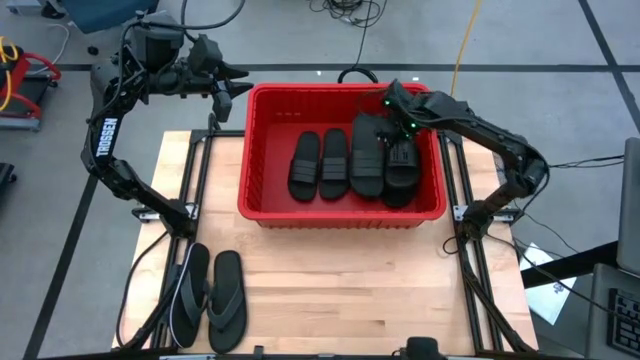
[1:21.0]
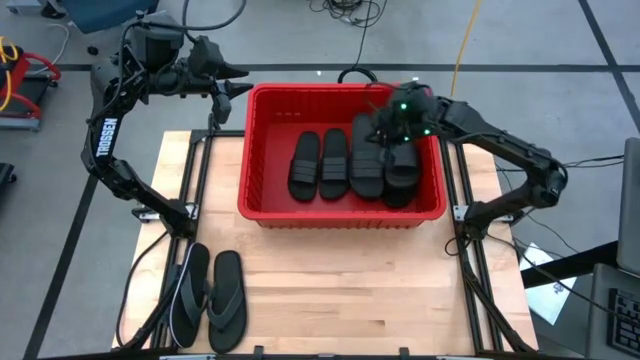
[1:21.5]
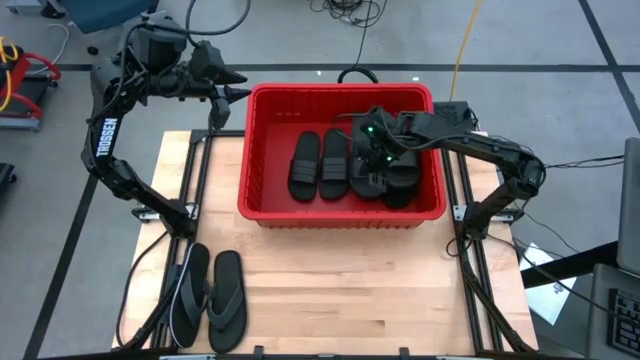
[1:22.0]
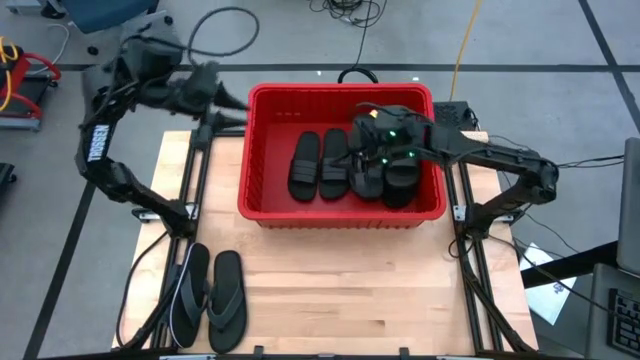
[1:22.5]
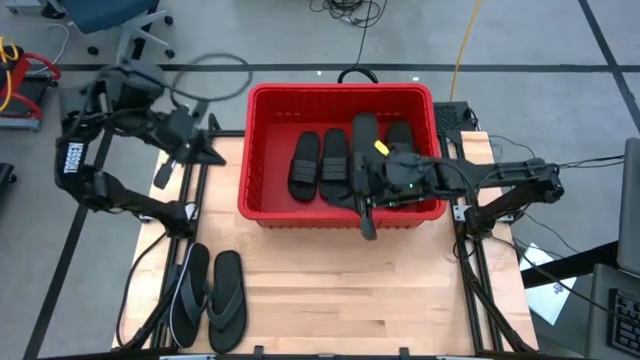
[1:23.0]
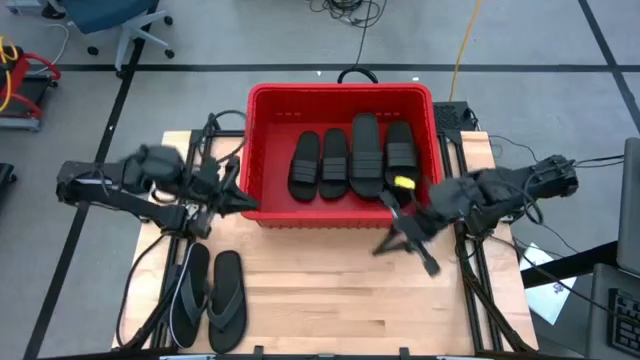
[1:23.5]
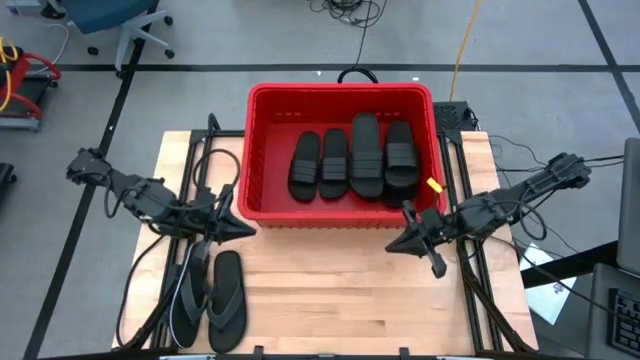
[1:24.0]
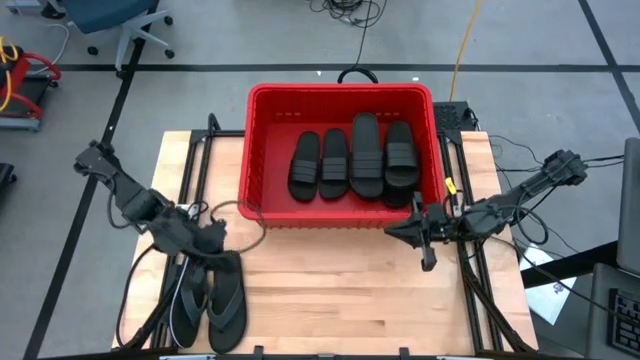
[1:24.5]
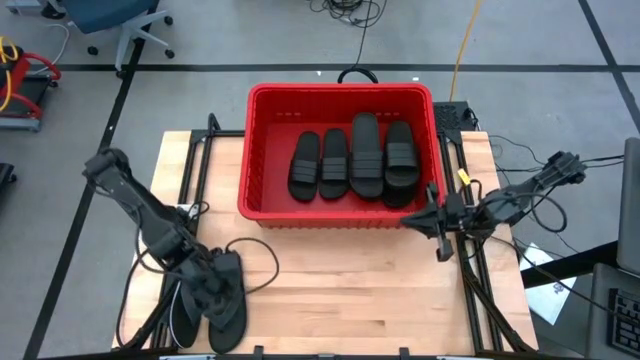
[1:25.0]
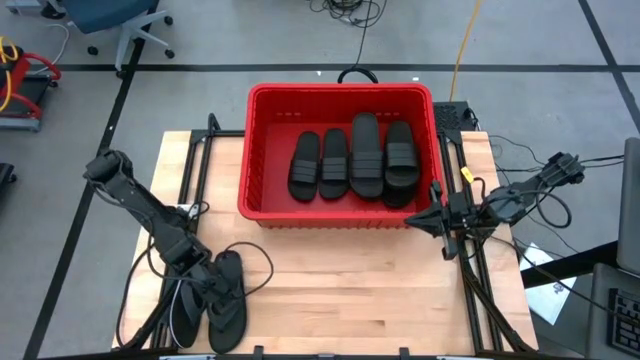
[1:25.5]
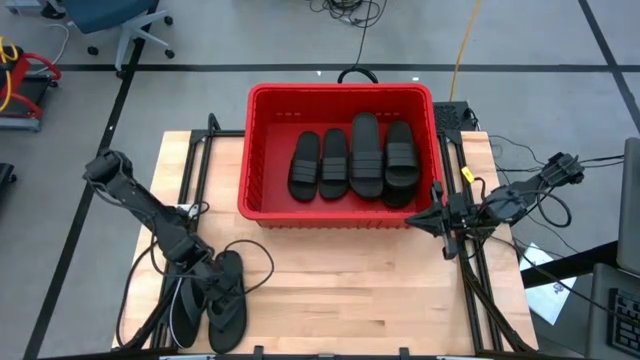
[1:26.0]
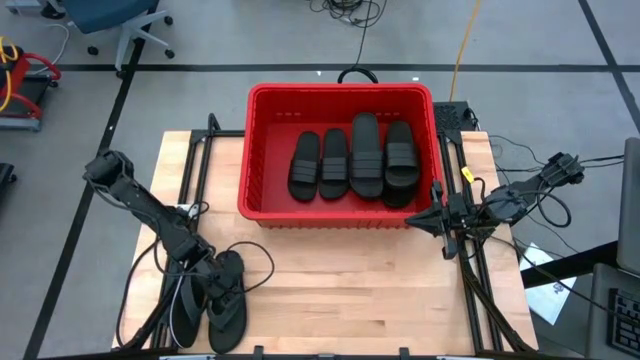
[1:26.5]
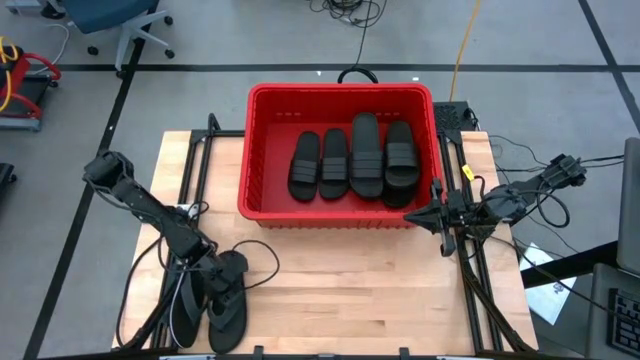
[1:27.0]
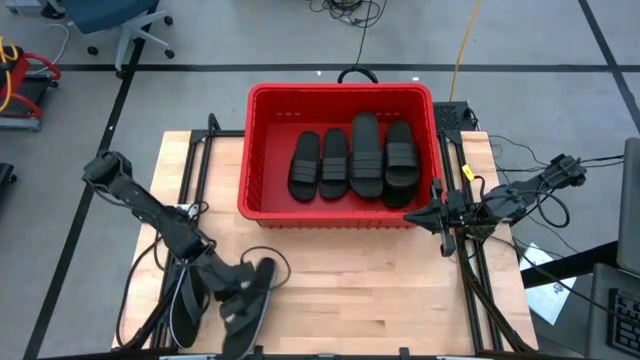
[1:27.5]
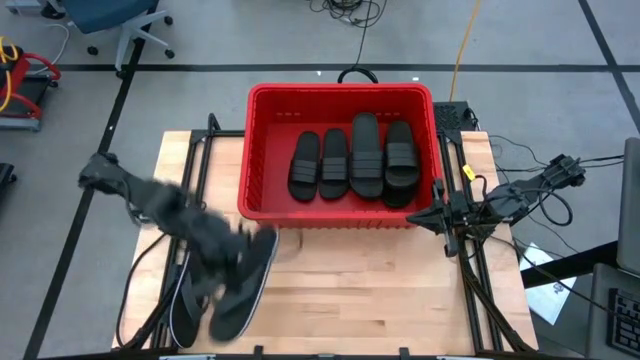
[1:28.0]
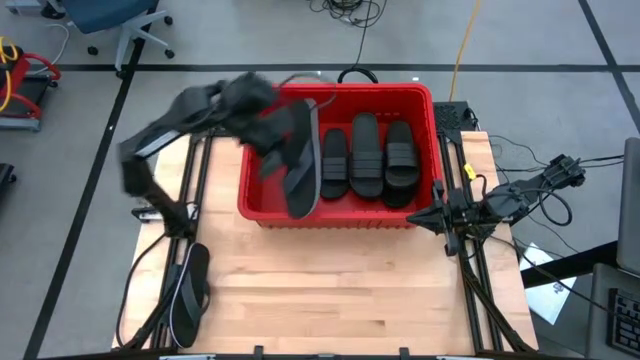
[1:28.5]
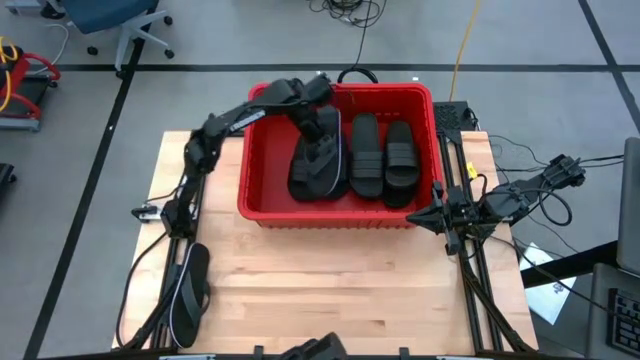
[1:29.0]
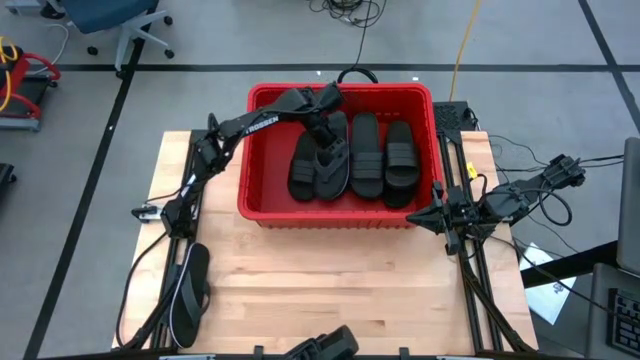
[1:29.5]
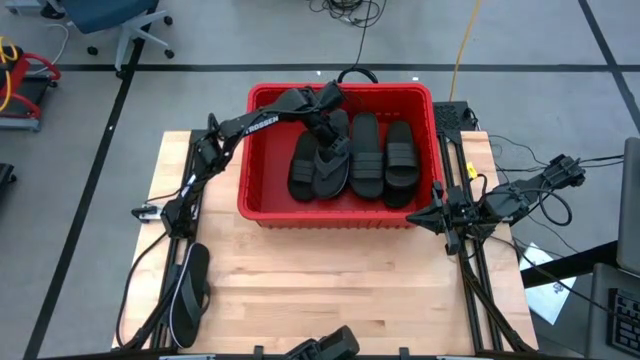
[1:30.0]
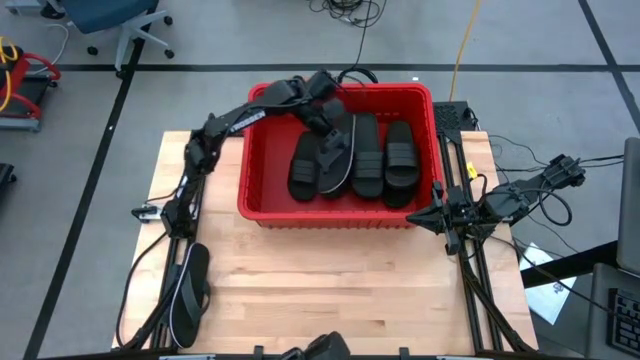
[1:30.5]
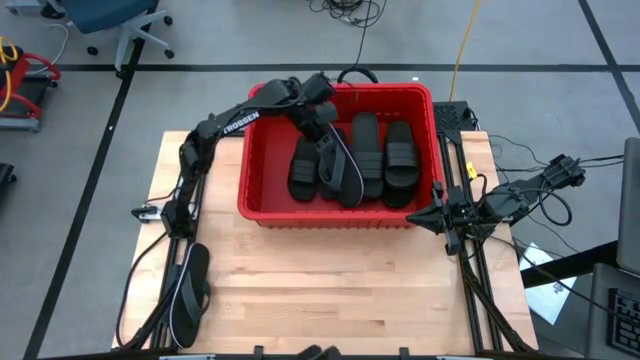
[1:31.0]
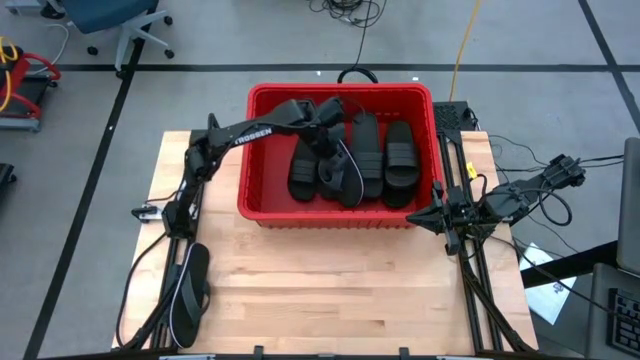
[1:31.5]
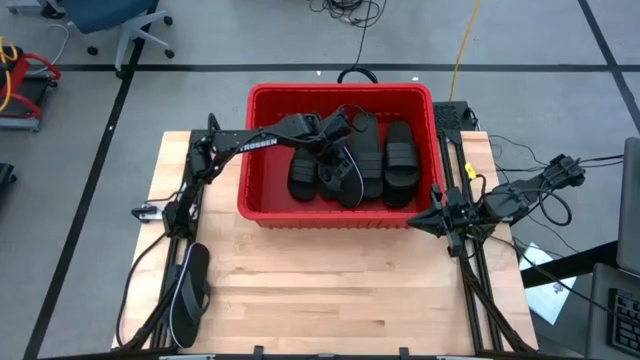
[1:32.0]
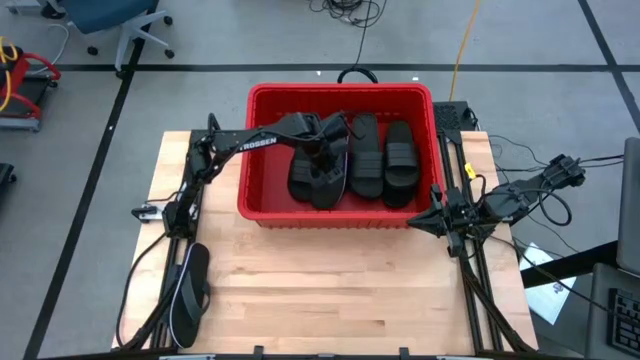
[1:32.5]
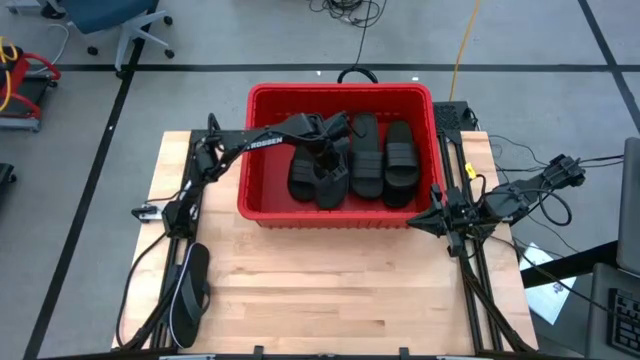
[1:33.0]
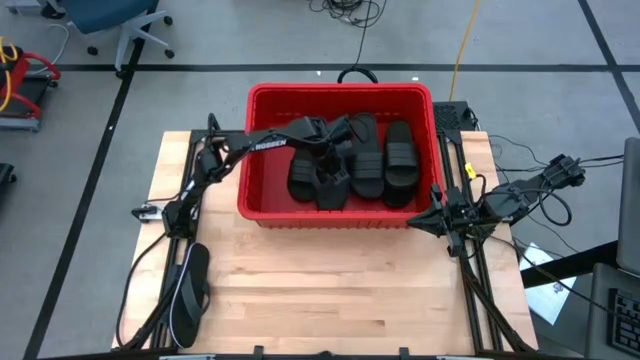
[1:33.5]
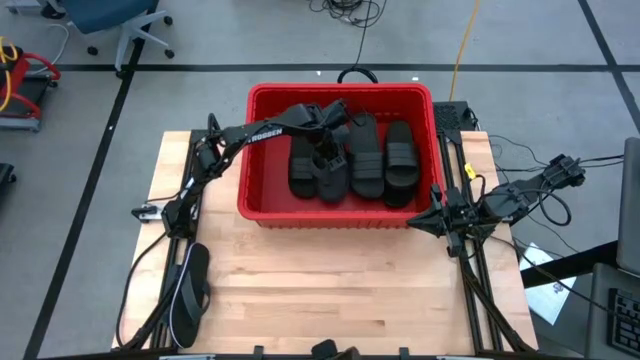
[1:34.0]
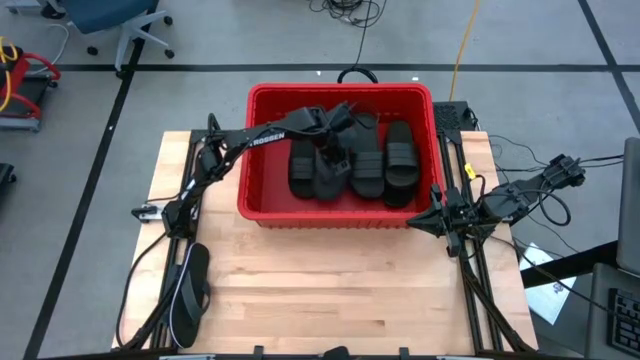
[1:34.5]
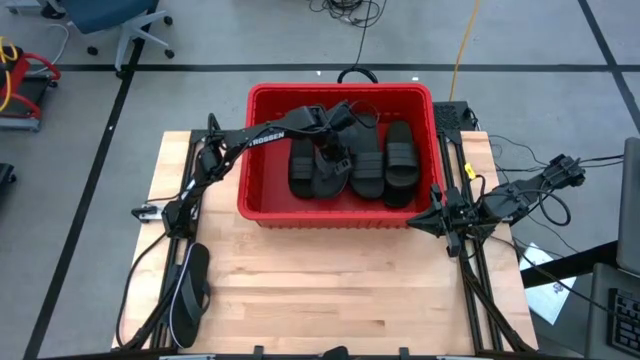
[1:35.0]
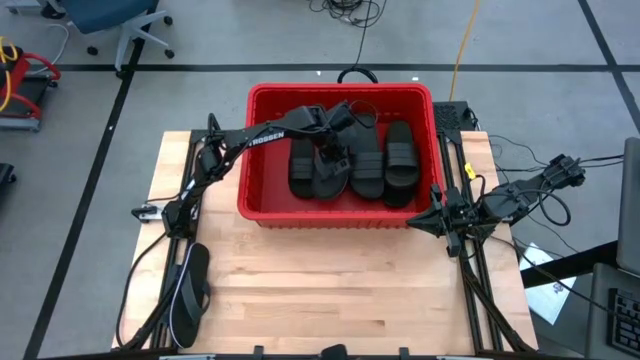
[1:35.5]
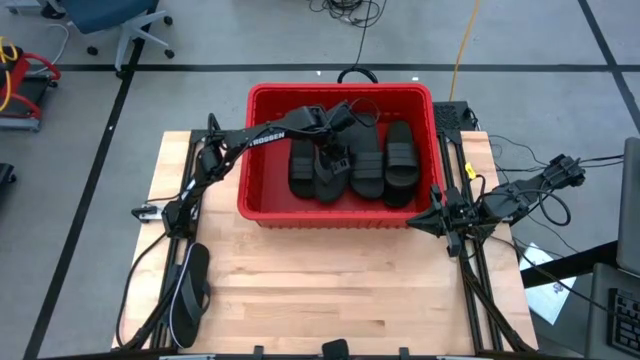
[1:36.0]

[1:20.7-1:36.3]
Task: Pick and place slides into bin
Put the right black slipper into the red bin

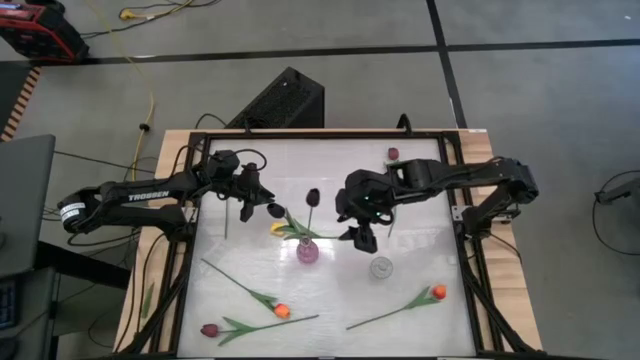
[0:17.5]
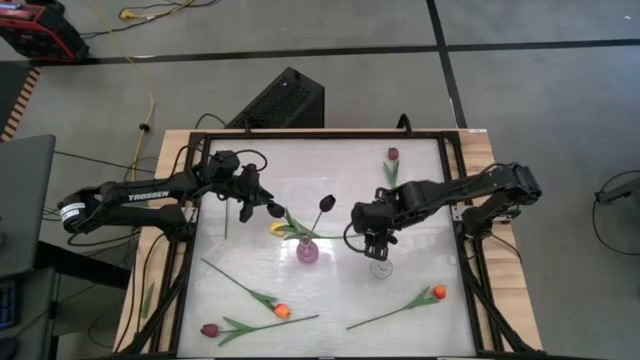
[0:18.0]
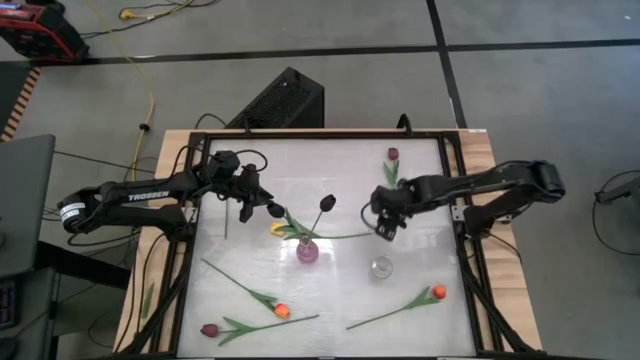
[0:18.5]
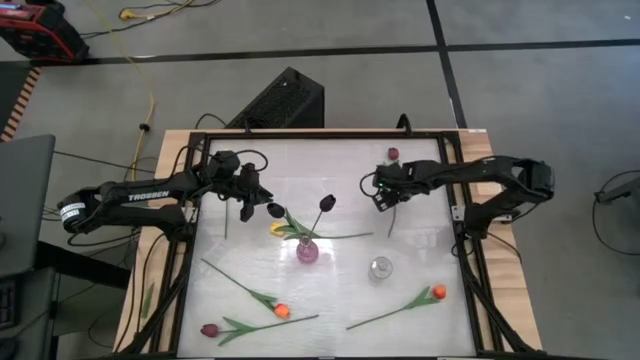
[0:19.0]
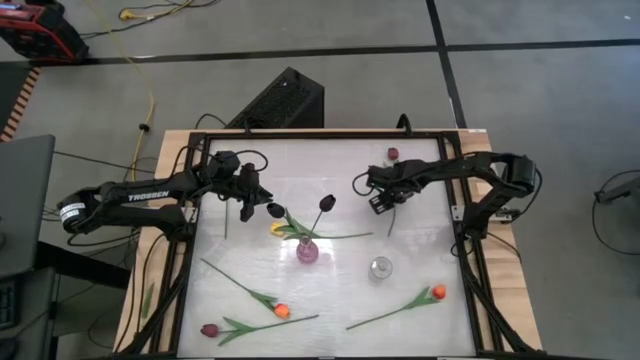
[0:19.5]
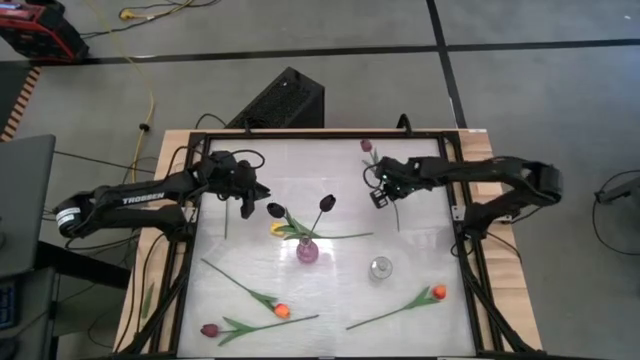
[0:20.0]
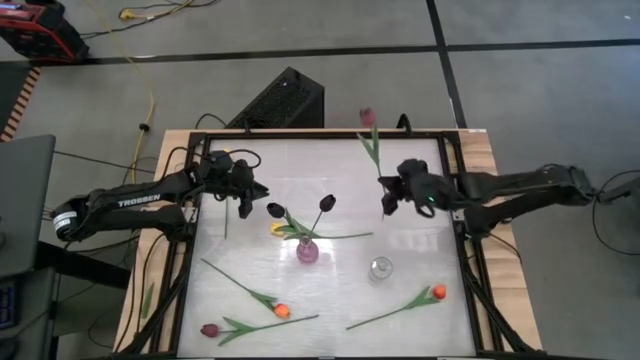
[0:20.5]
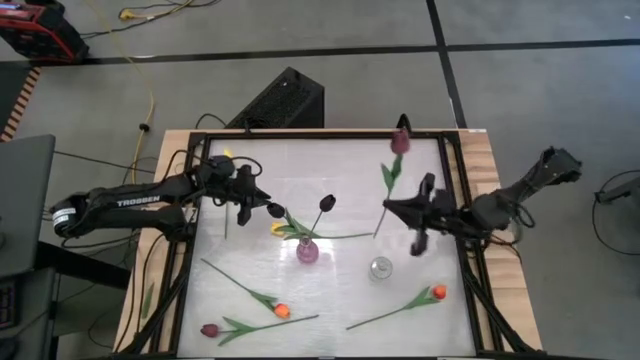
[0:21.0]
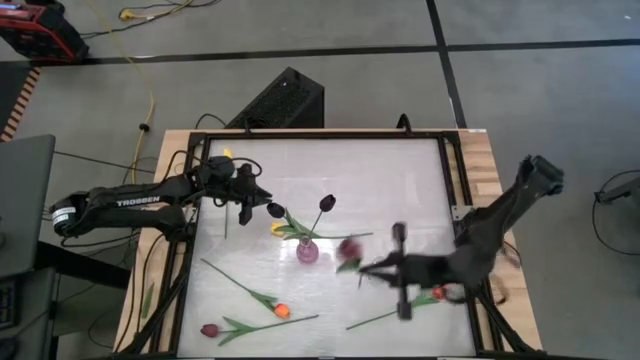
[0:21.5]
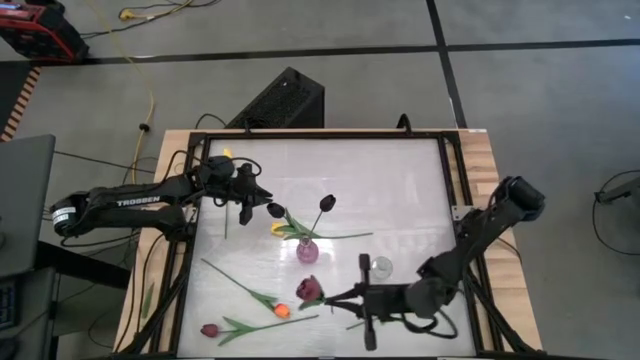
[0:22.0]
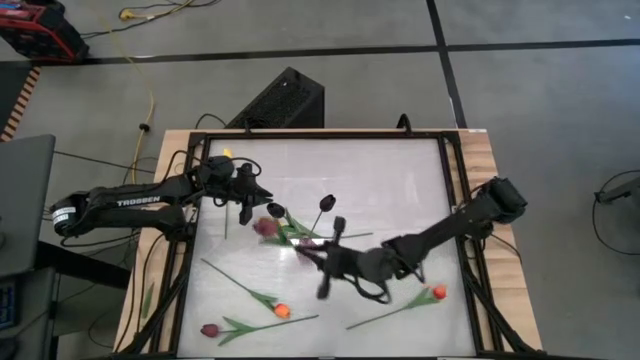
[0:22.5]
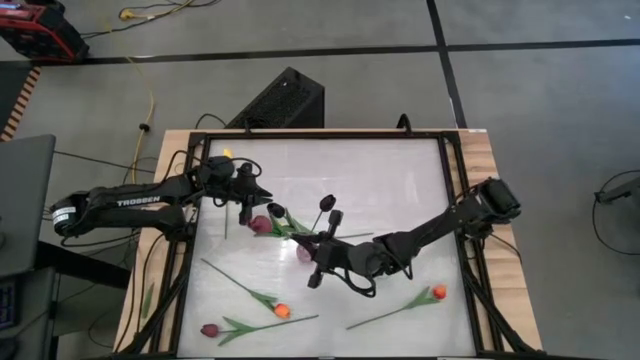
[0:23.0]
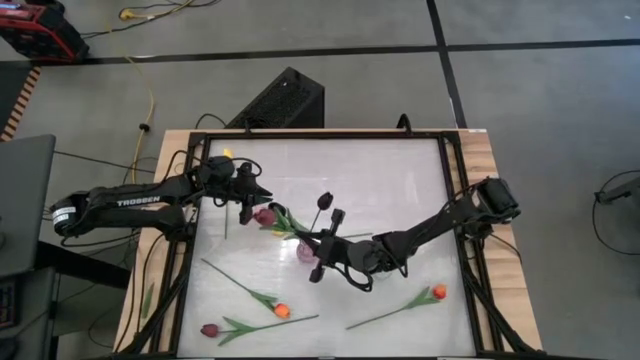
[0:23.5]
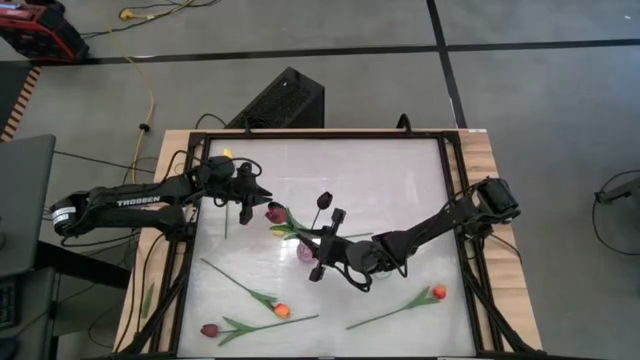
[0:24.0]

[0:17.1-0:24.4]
Task: Sort flowers into vase by color
Put the top red flower into the pink vase
